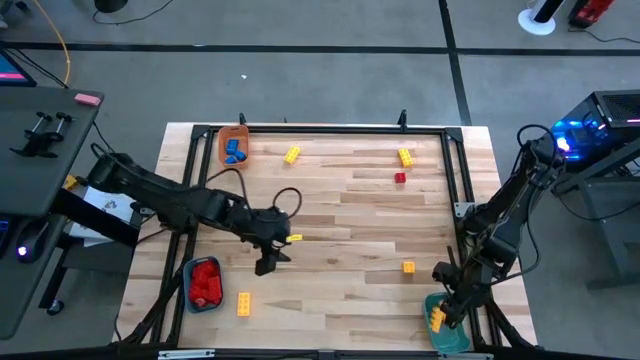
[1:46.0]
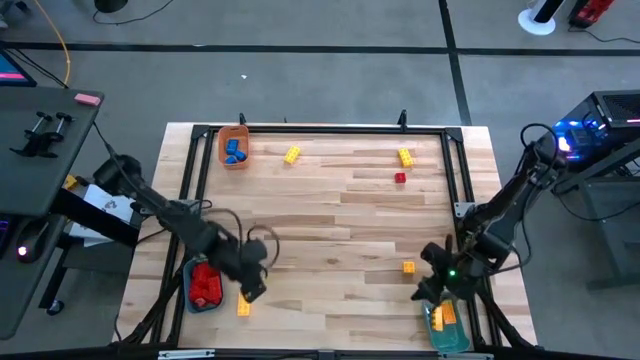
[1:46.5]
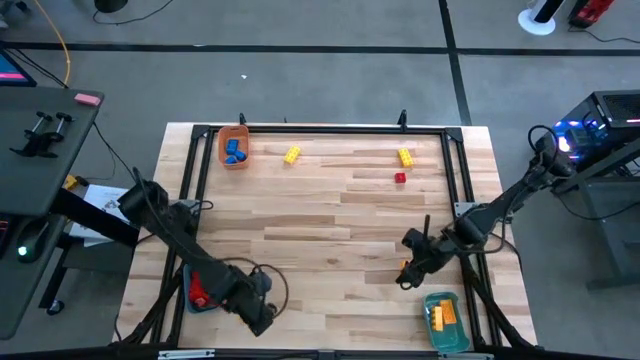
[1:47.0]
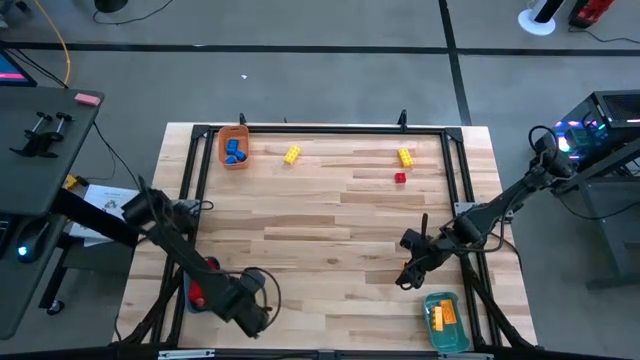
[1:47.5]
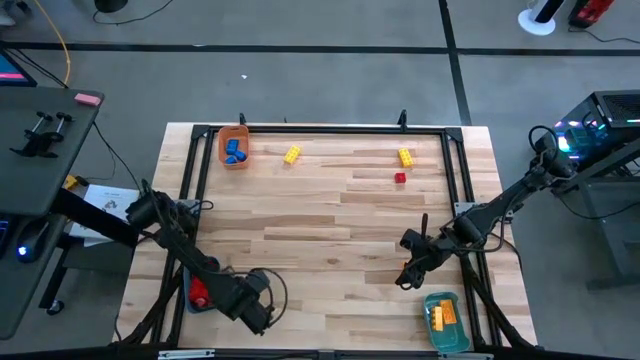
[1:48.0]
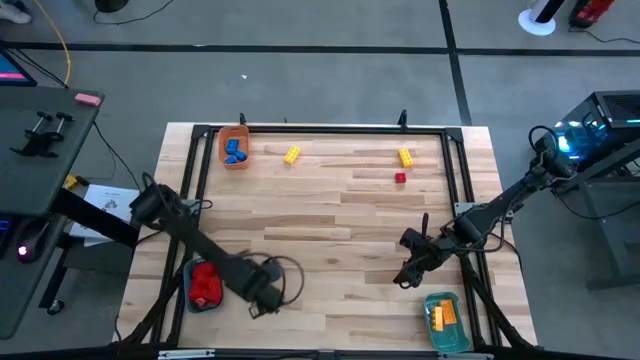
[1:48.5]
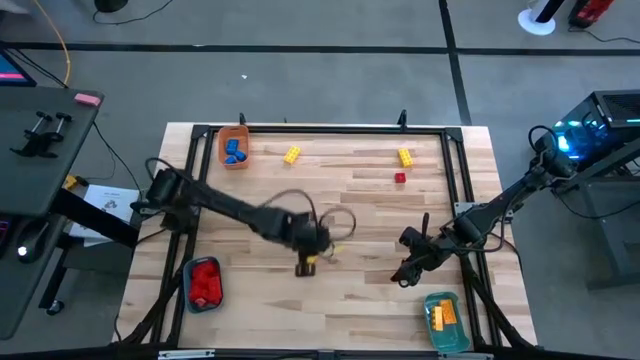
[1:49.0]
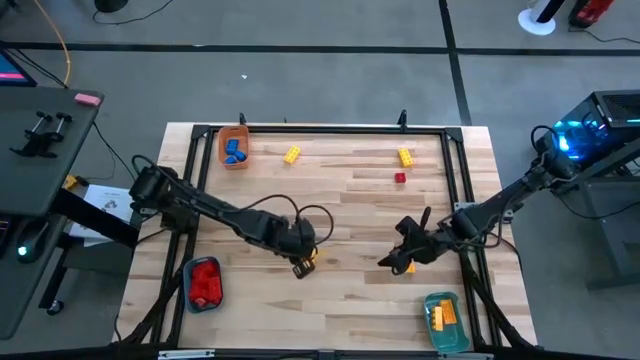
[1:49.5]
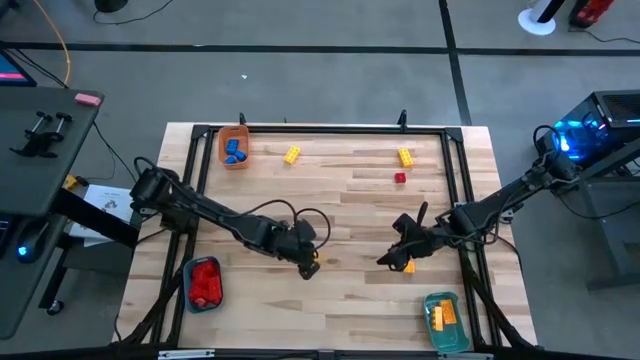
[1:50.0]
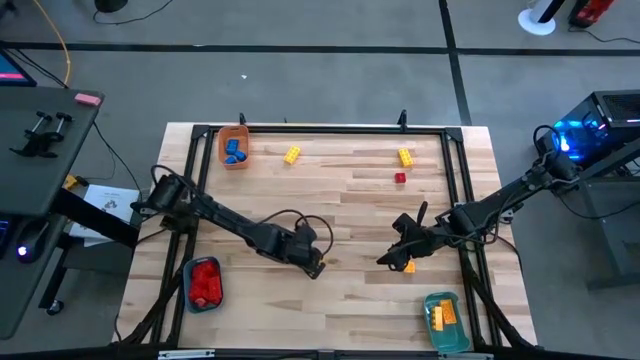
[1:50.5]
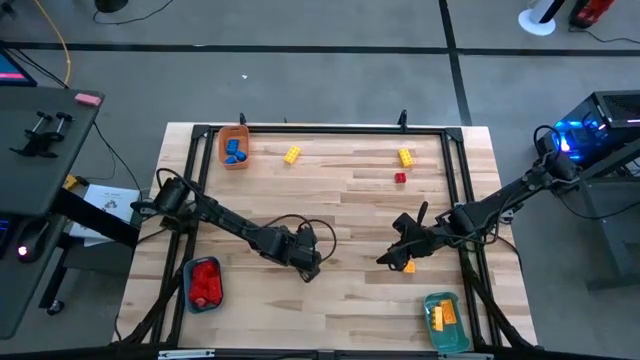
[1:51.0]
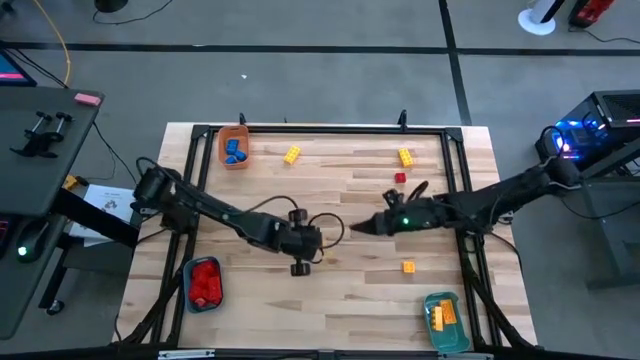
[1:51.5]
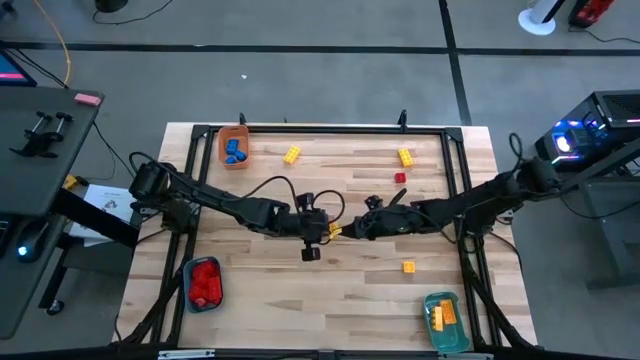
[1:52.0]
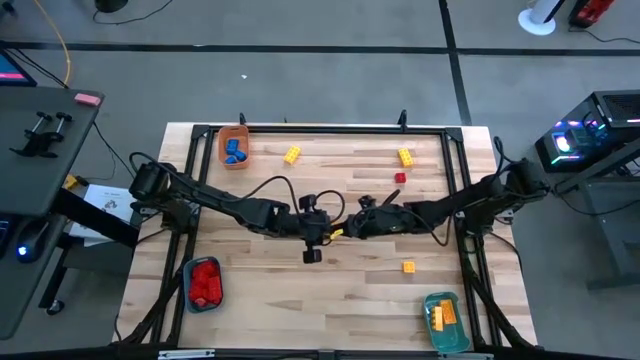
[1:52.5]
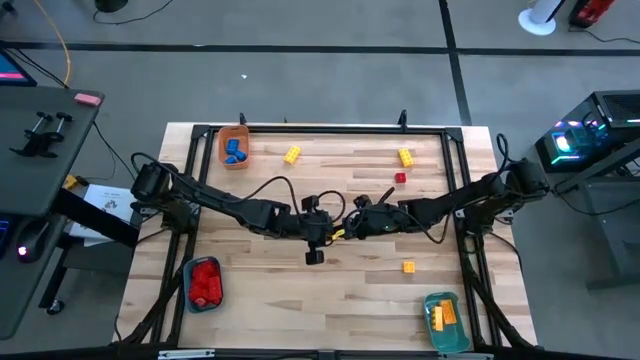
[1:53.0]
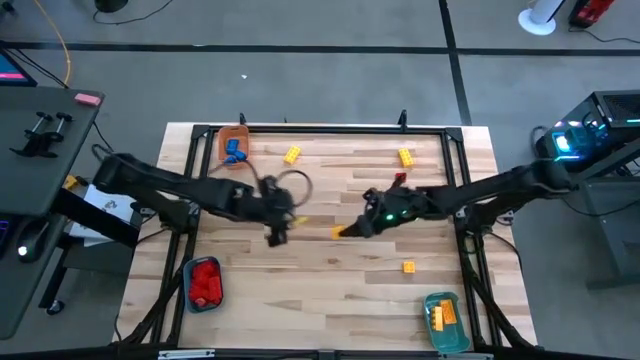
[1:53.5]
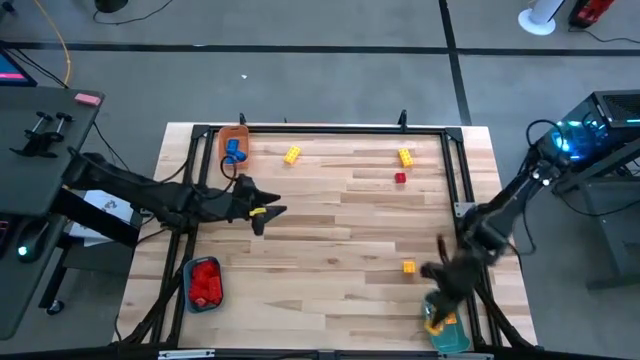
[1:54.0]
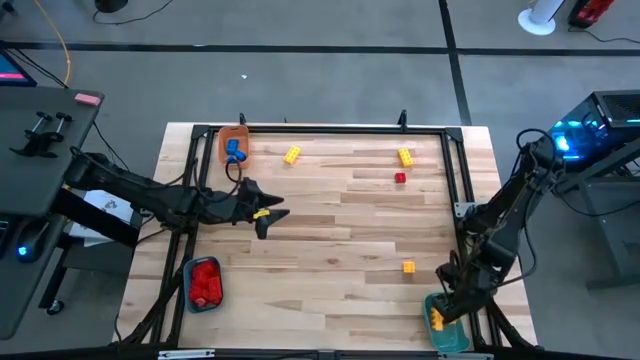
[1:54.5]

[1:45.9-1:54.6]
Task: Sort blocks
Put the yellow game piece into the right blue bin

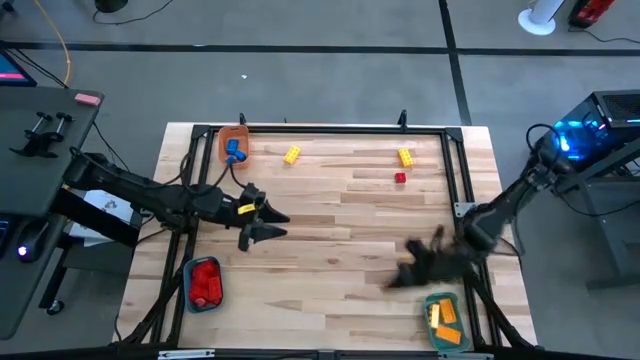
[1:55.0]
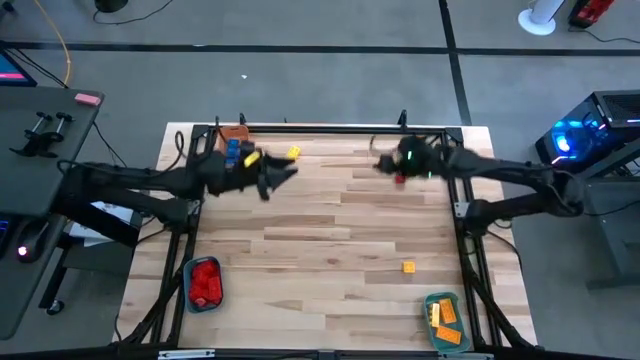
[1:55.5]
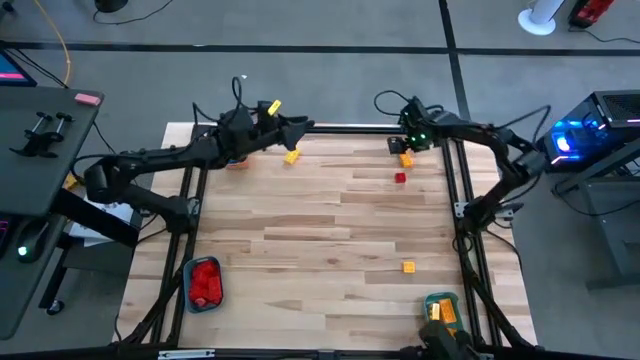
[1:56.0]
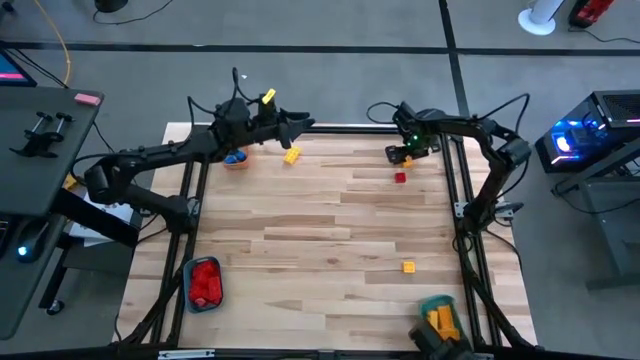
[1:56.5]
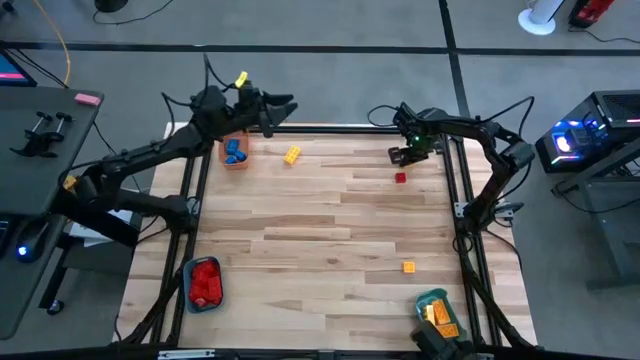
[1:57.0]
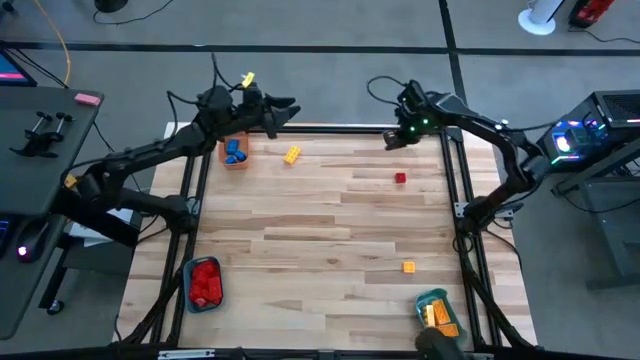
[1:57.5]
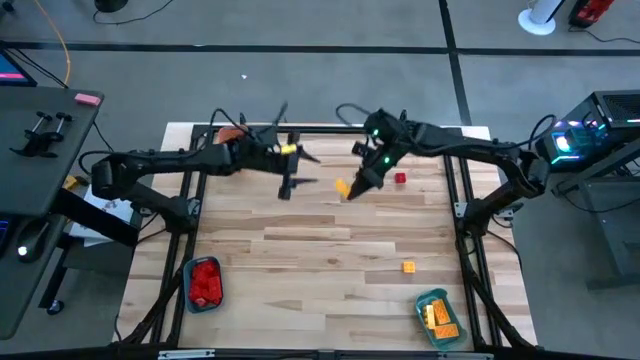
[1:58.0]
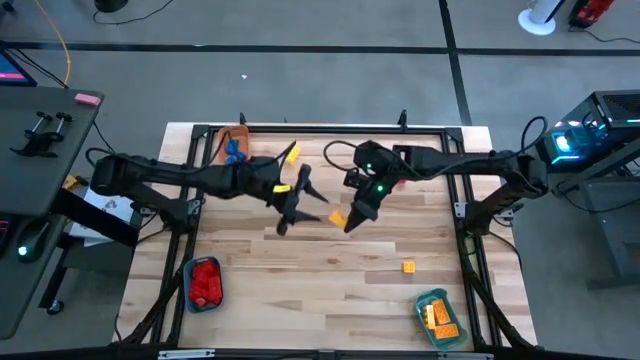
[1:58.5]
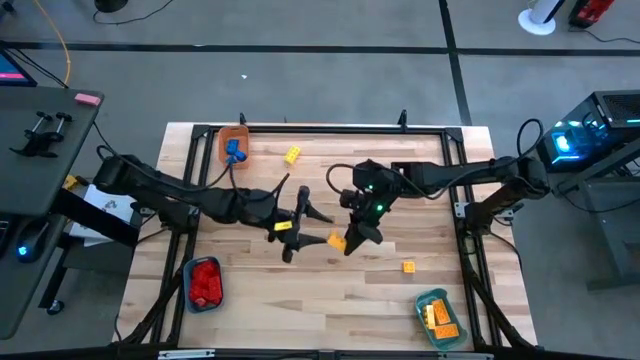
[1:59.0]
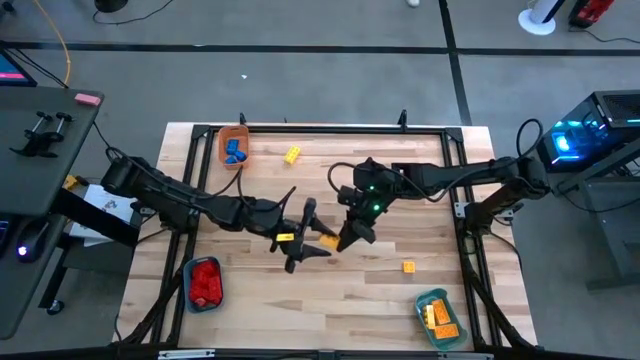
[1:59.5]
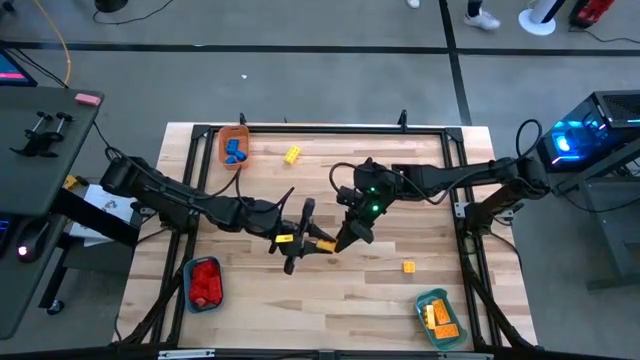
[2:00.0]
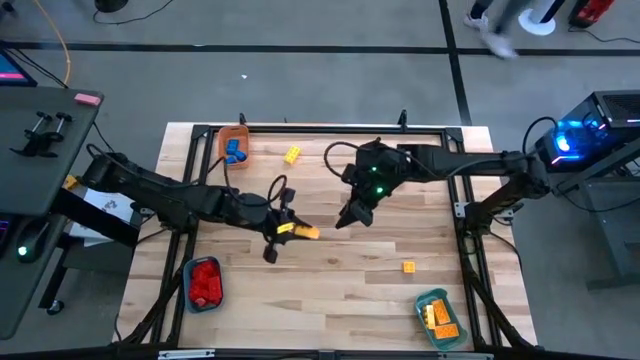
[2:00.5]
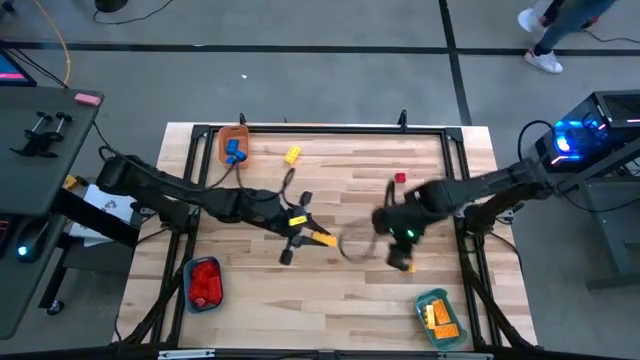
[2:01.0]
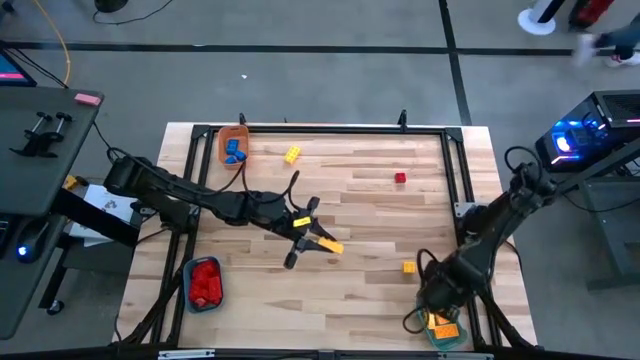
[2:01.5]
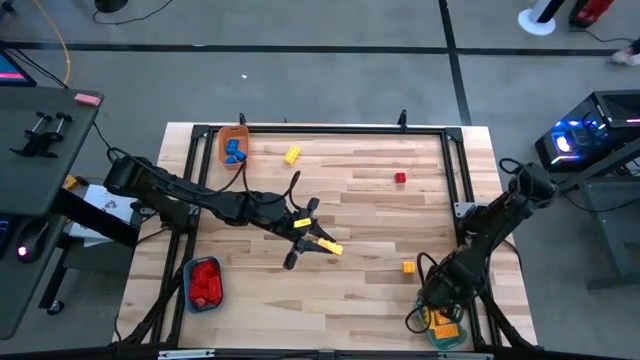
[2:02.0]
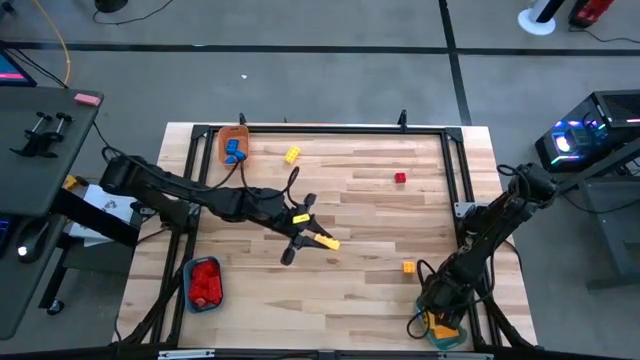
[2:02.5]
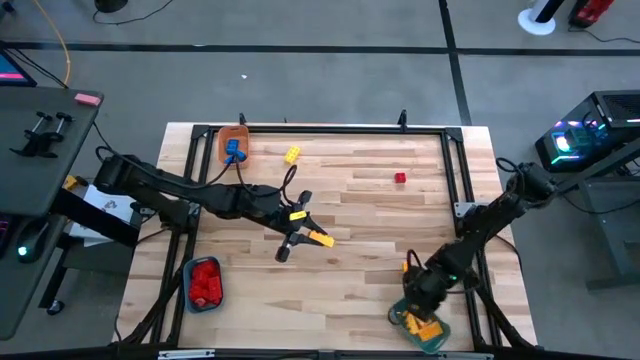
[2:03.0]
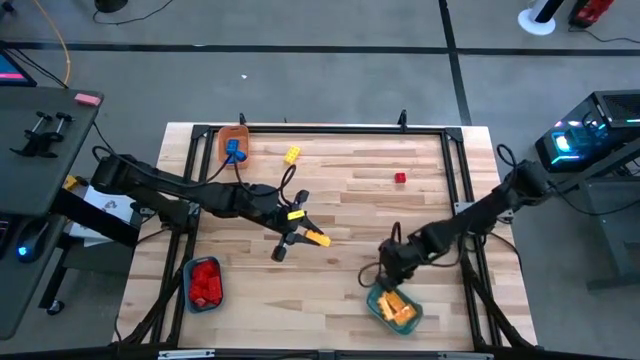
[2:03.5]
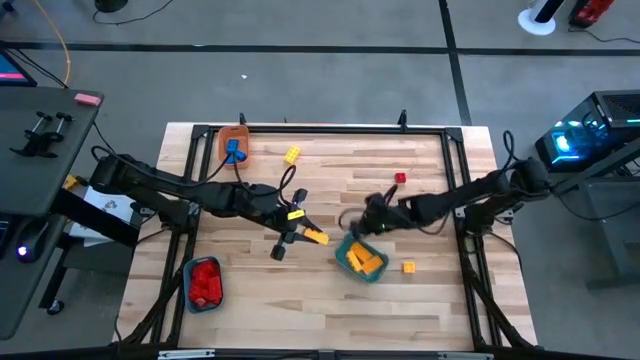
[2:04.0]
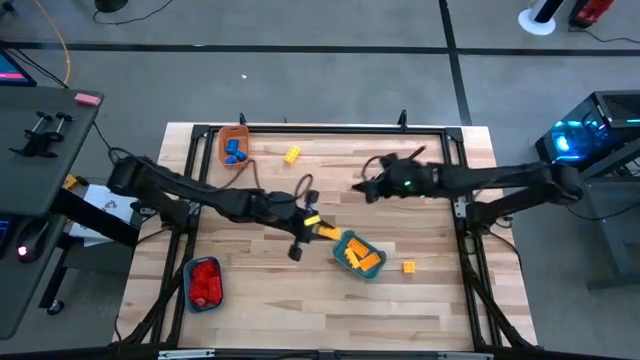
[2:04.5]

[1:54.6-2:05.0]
Put the yellow game piece into the right blue bin

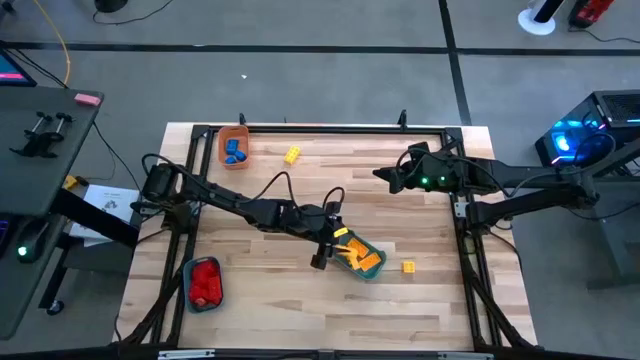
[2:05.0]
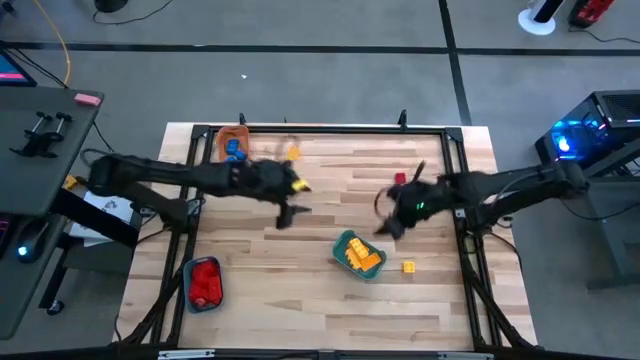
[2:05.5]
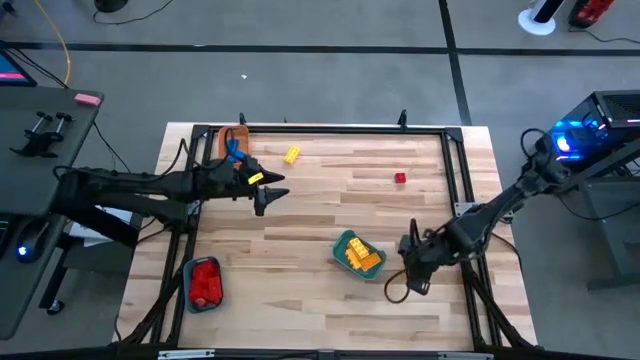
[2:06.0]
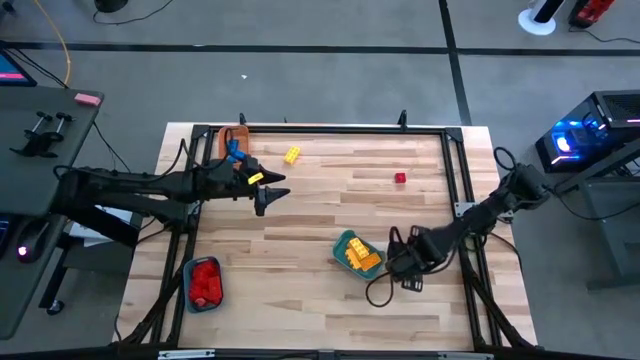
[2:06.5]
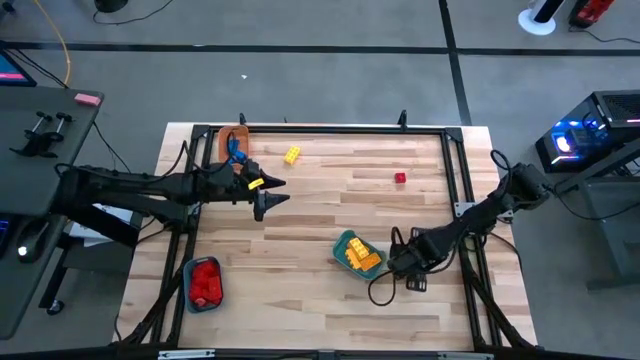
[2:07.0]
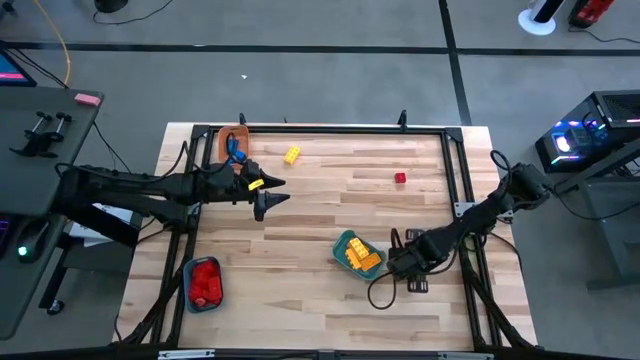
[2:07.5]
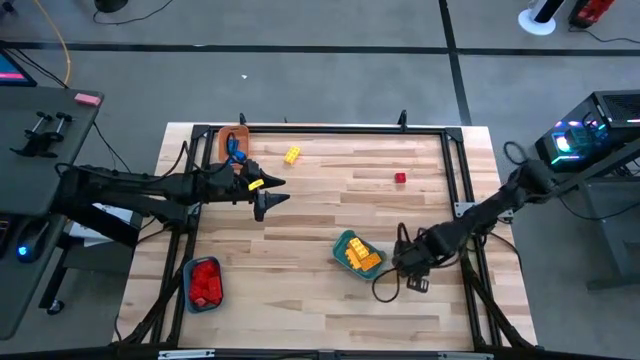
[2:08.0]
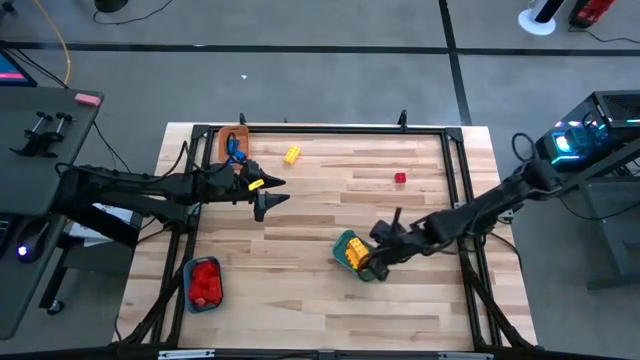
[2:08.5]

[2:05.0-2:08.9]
Put the yellow game piece into the right blue bin
